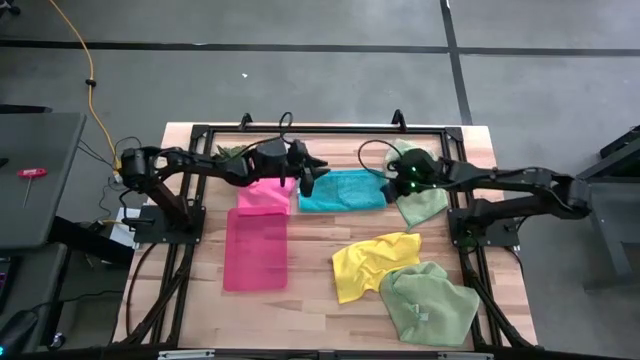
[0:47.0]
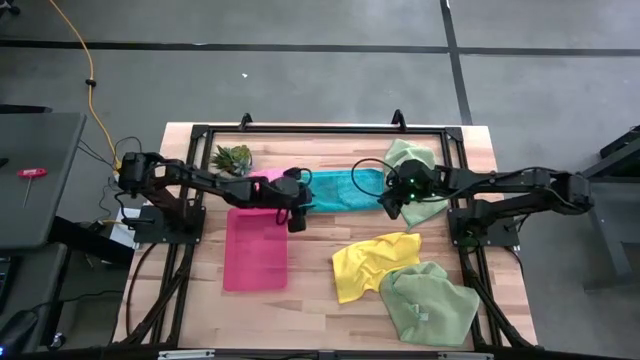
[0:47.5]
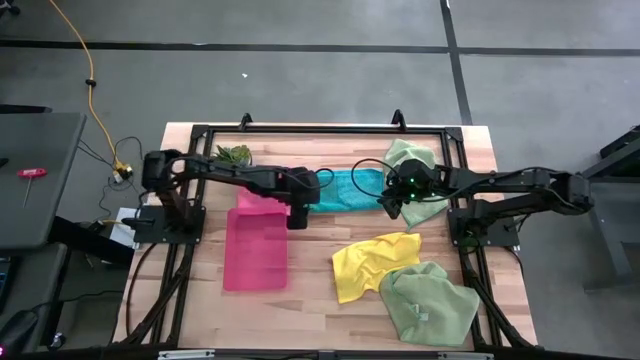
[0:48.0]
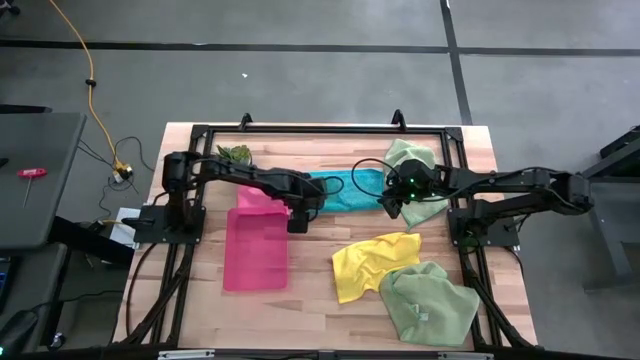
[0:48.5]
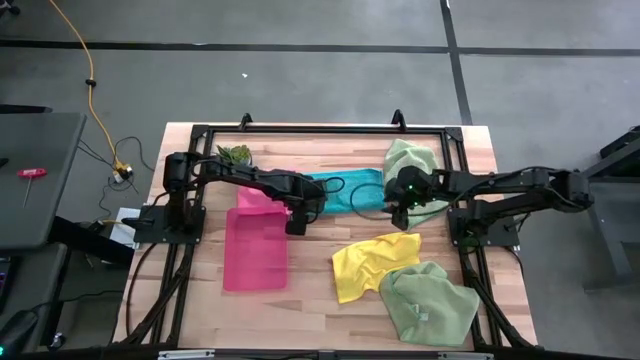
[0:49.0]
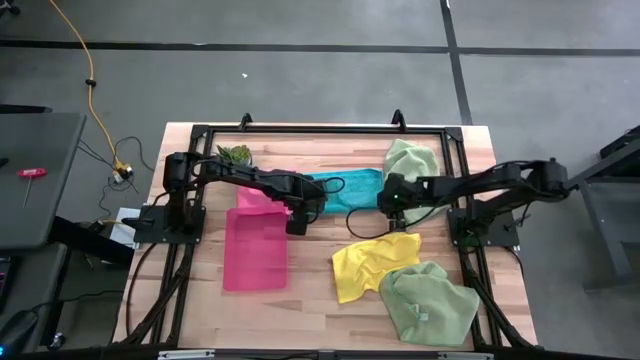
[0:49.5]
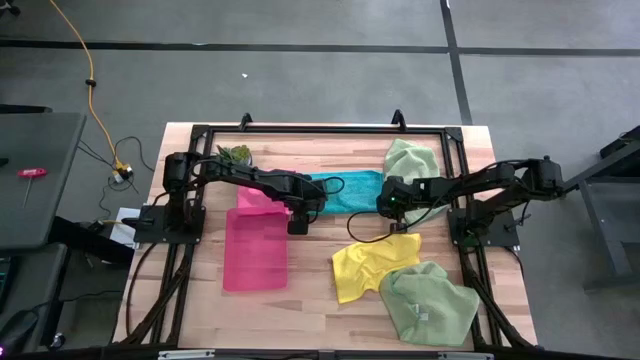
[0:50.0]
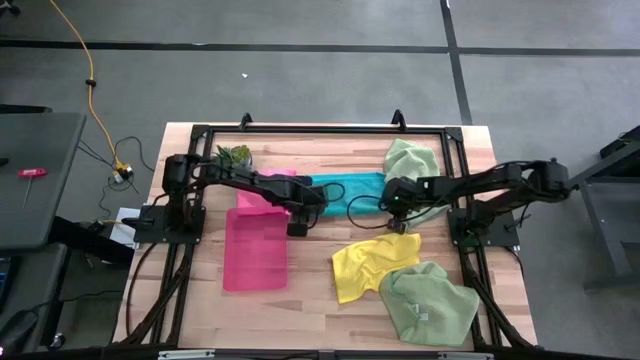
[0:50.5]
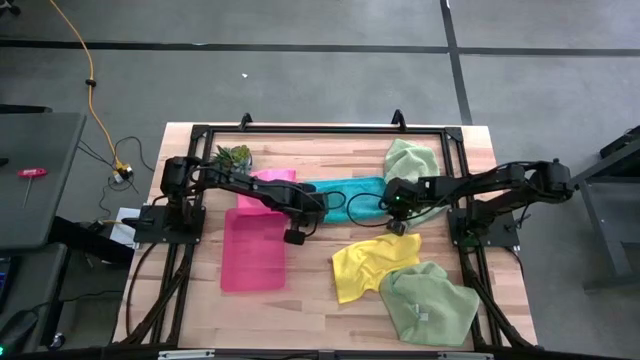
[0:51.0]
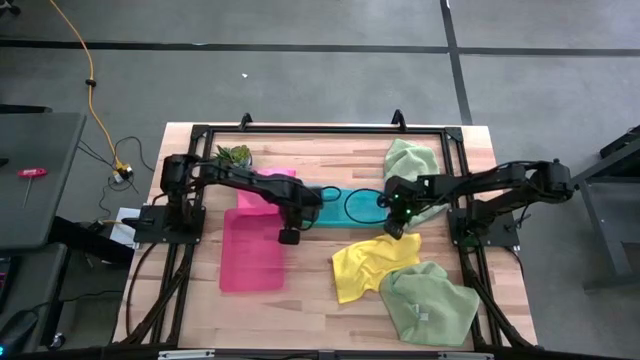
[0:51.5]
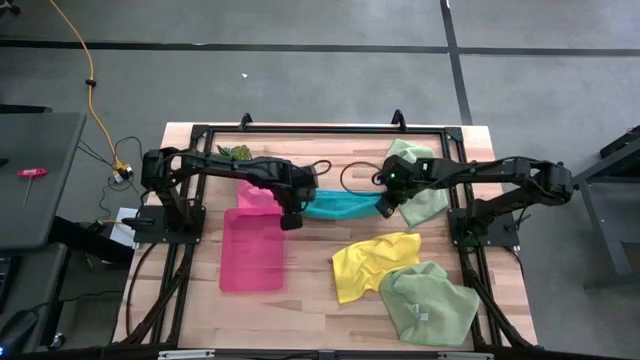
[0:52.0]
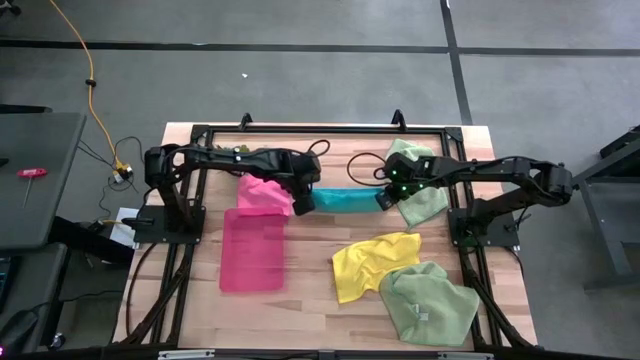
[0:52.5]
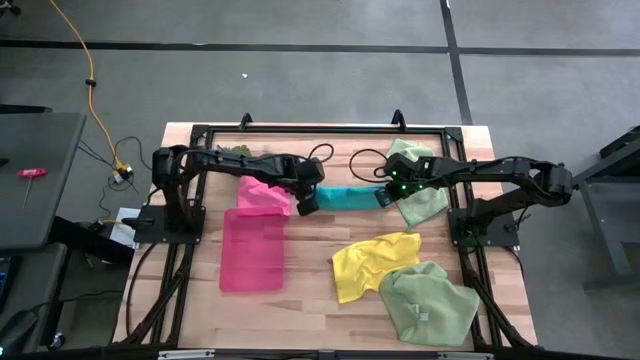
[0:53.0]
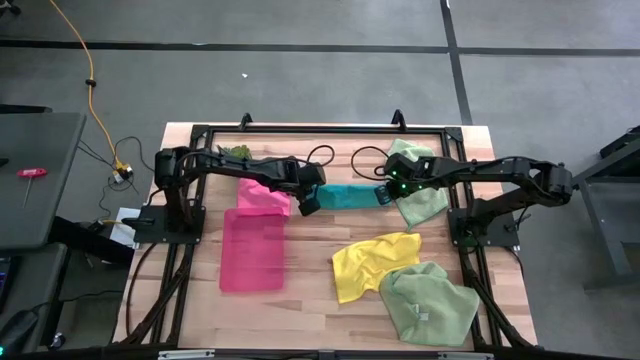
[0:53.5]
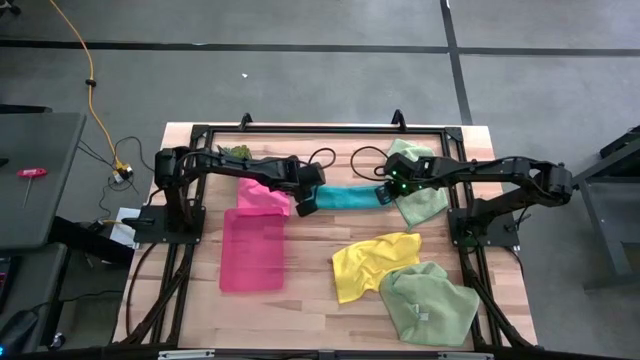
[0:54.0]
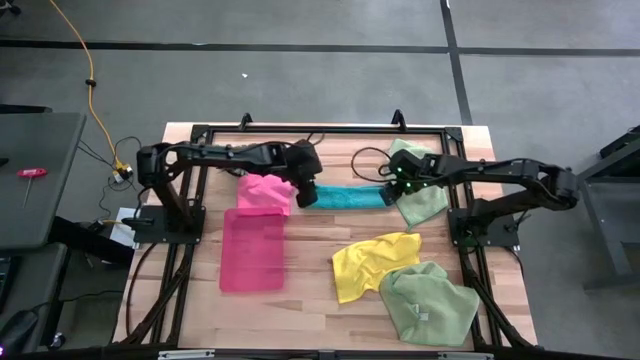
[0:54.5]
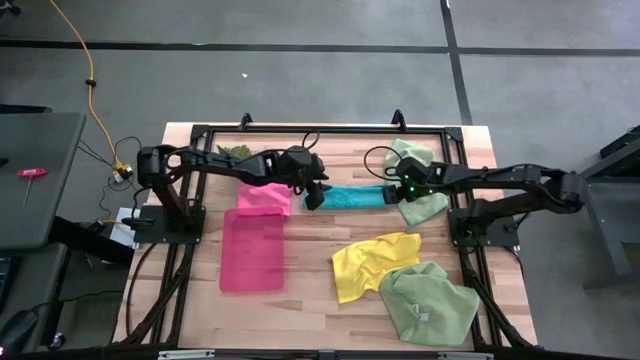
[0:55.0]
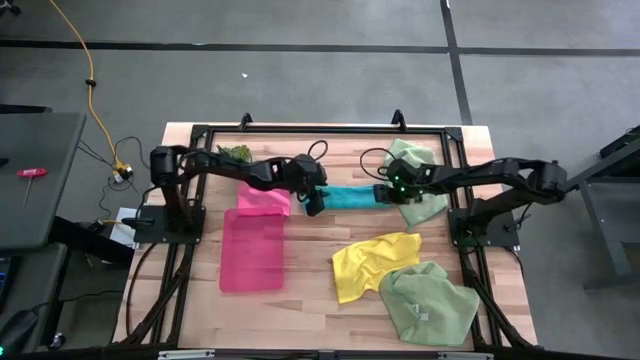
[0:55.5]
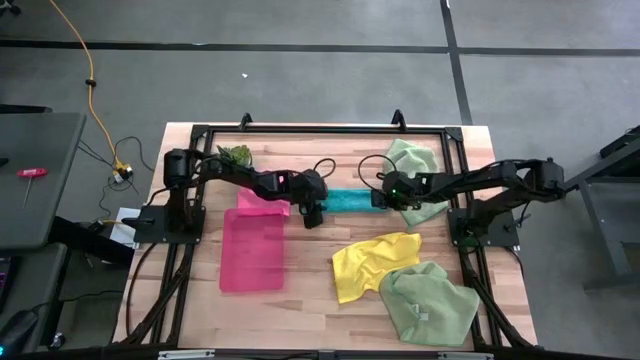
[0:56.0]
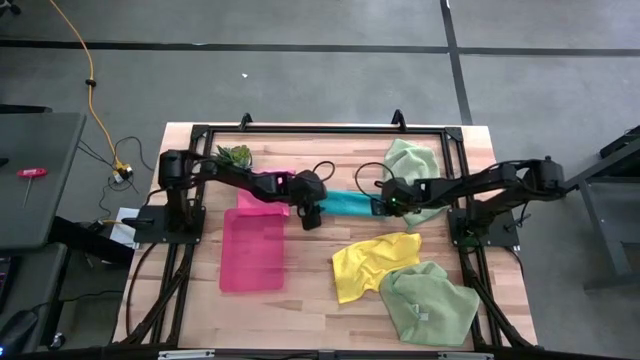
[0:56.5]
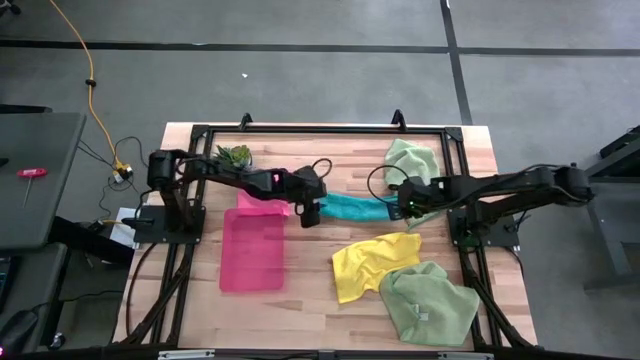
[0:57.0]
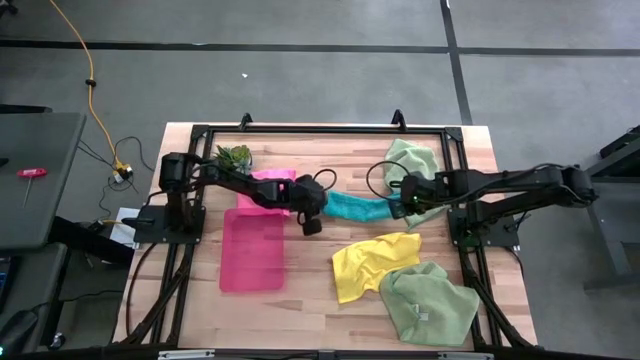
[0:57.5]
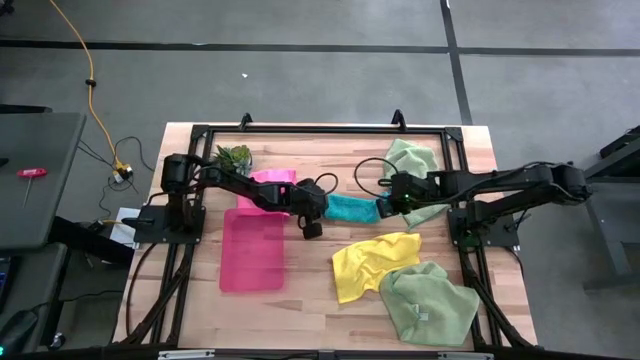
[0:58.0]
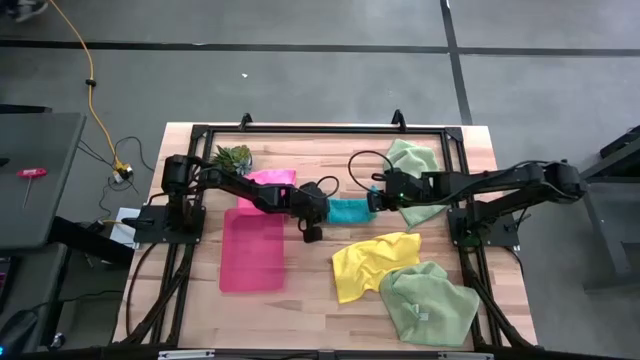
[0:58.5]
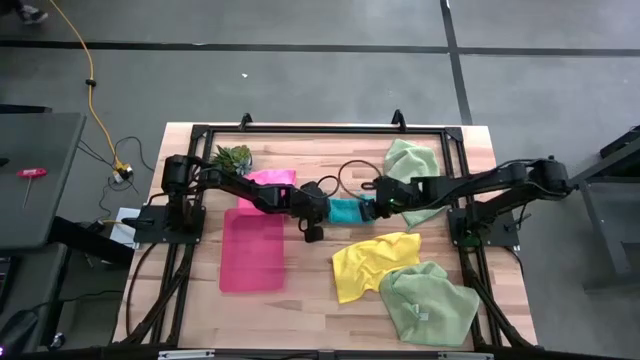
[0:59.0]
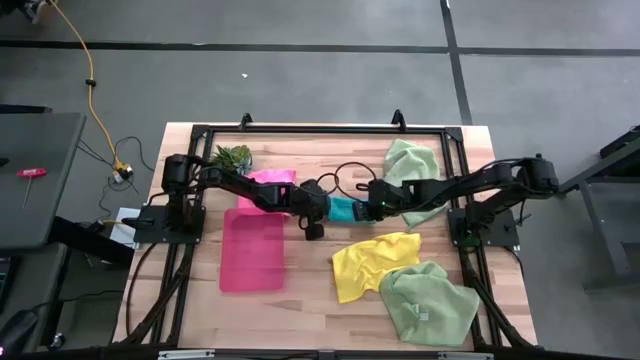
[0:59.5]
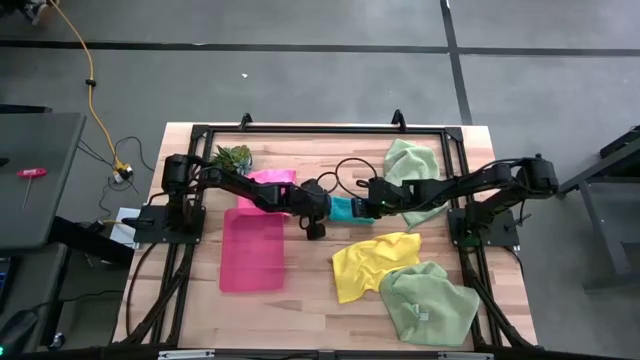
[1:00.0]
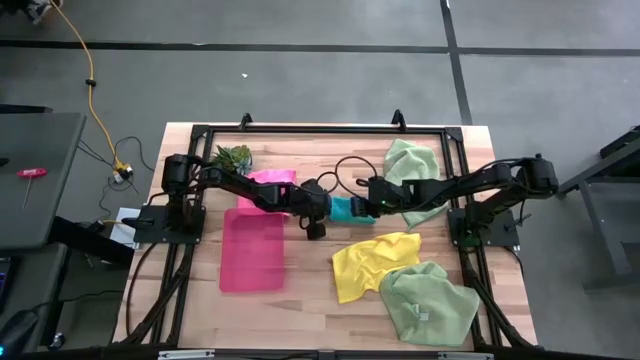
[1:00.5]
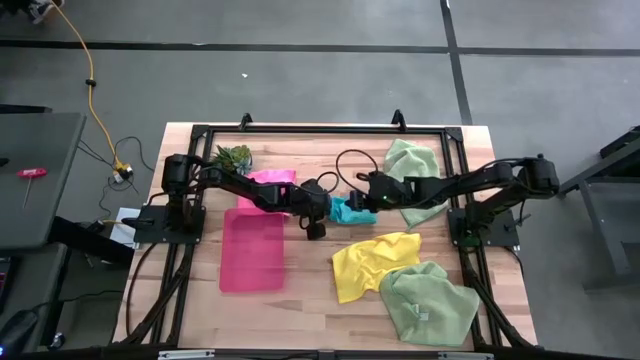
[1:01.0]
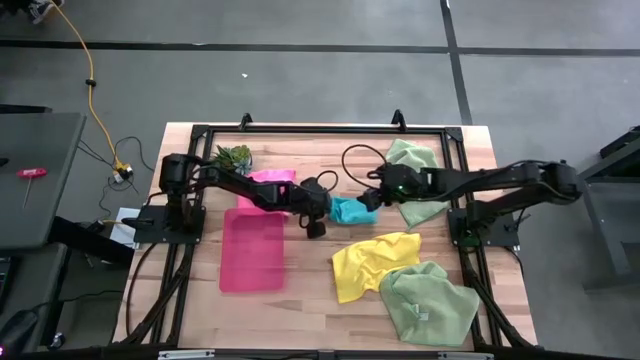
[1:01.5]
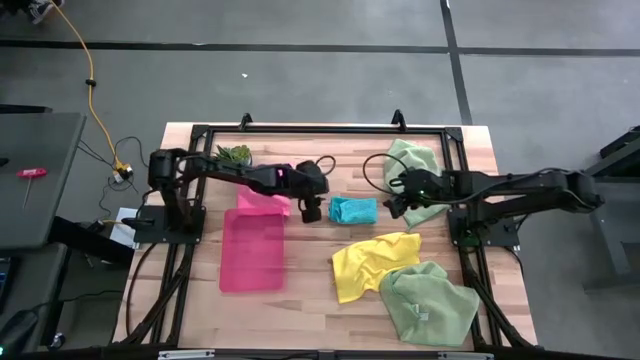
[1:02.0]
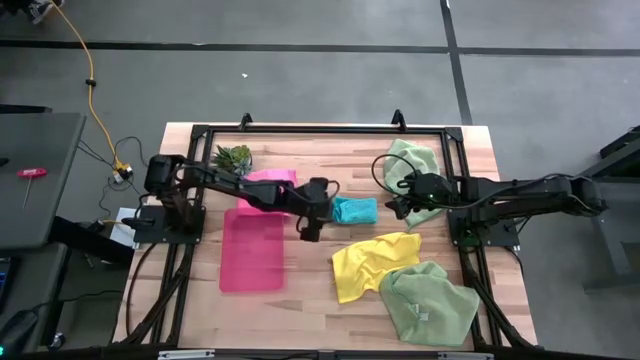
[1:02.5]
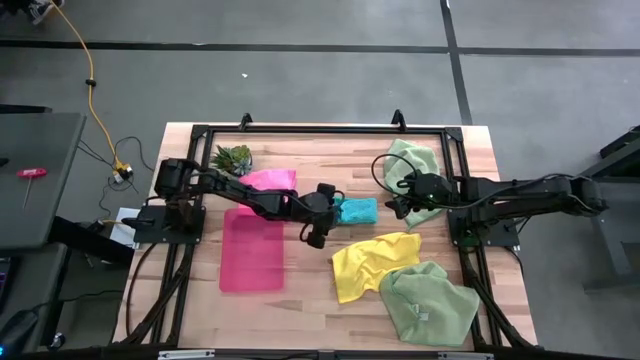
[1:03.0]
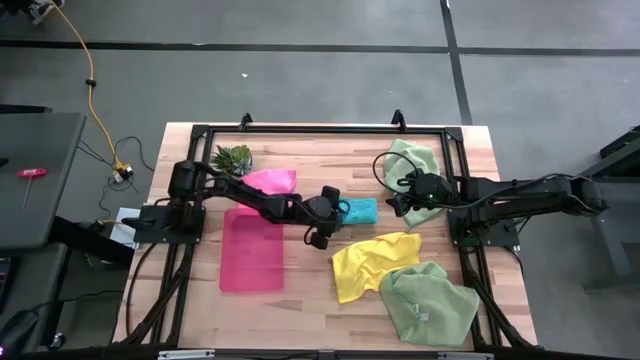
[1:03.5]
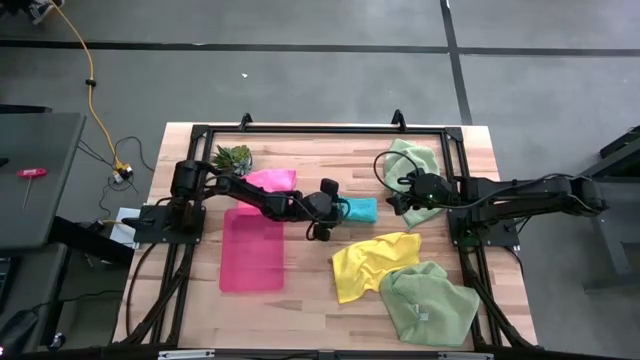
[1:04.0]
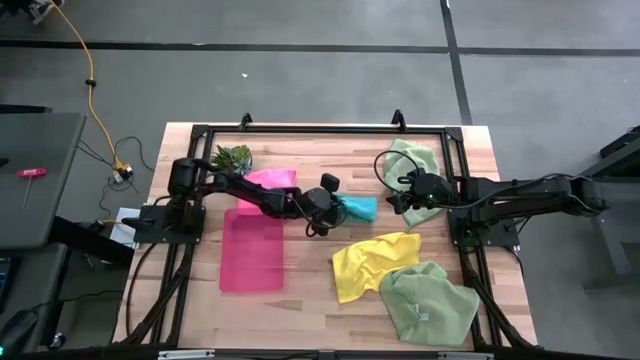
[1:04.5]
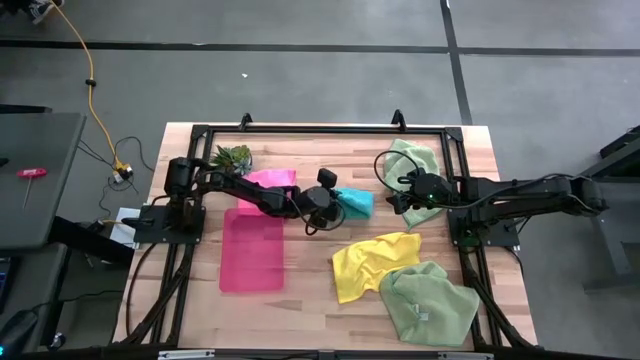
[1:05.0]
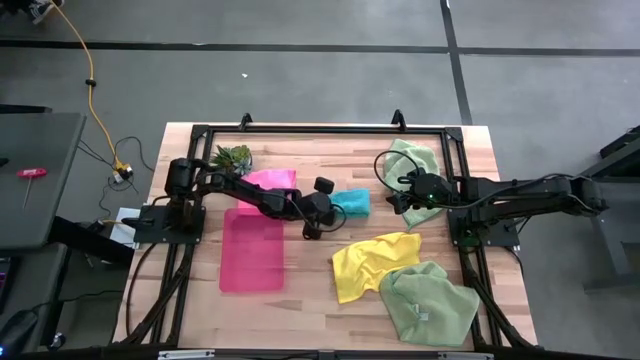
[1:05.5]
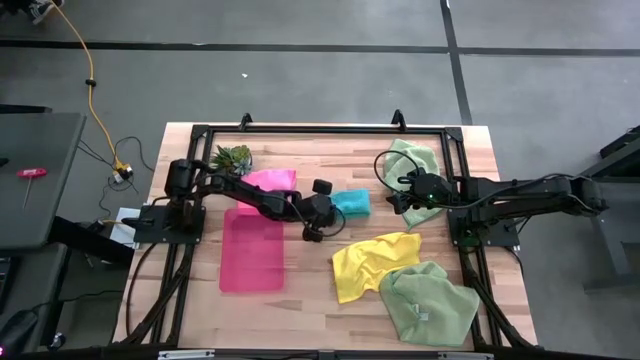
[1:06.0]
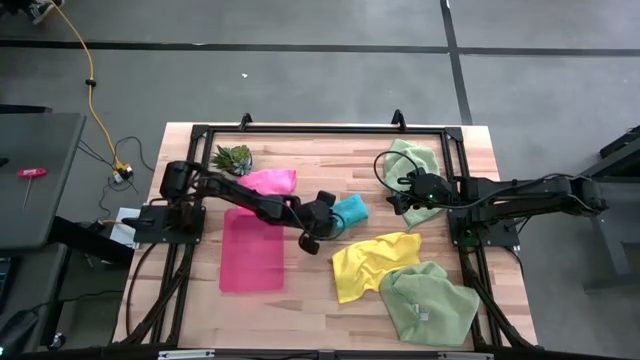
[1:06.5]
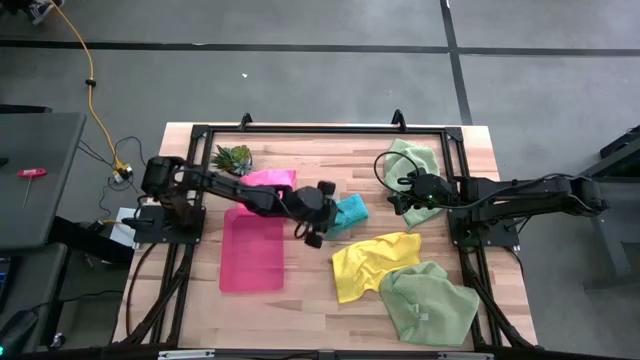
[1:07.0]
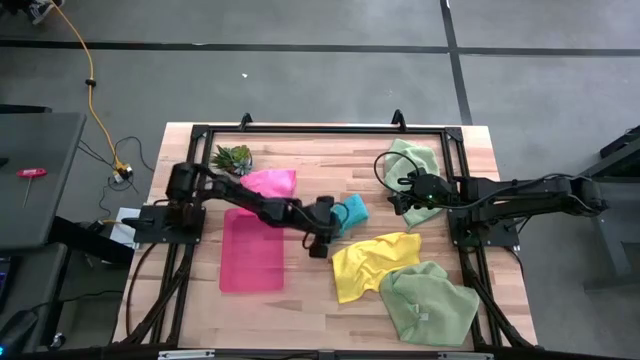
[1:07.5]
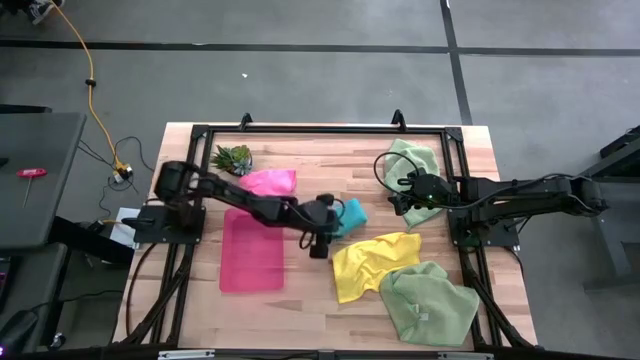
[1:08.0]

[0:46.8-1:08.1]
Task: Fold microfiber towels
Fold the blue microfiber towel
